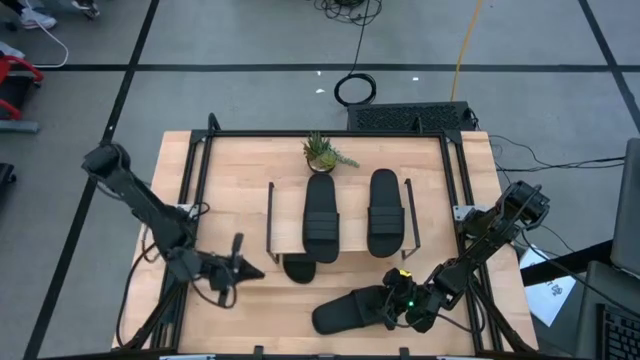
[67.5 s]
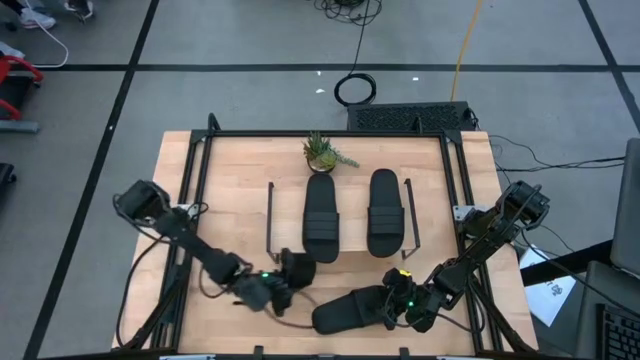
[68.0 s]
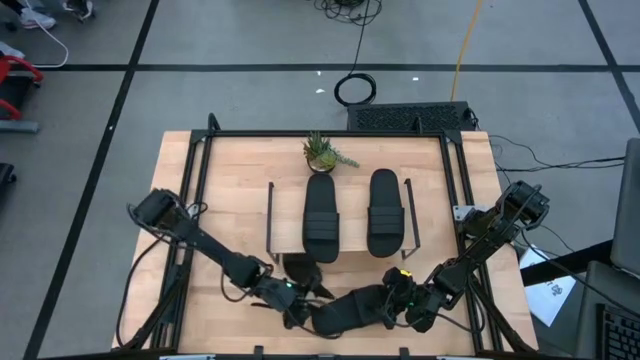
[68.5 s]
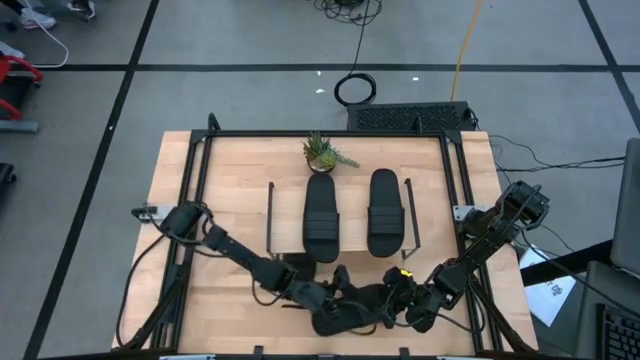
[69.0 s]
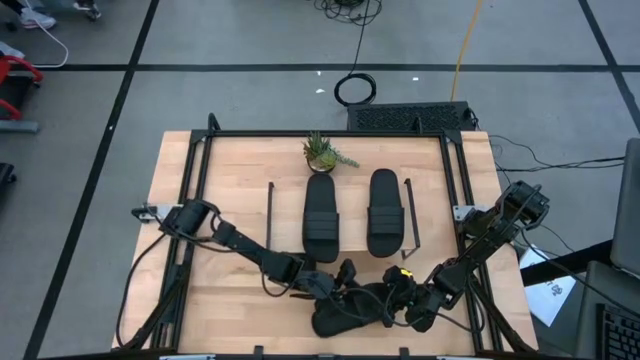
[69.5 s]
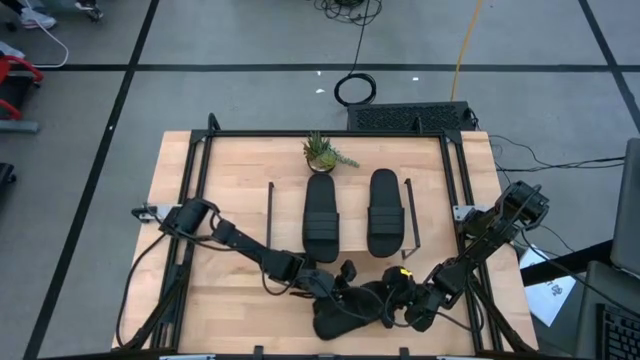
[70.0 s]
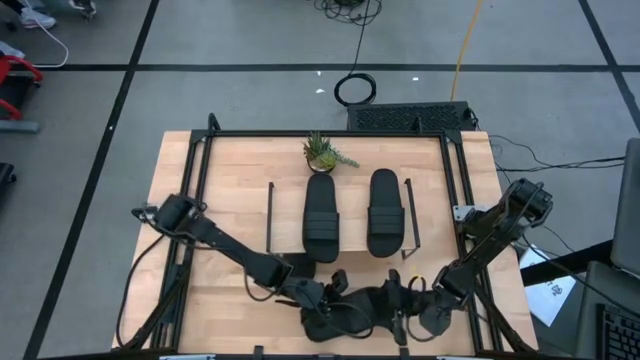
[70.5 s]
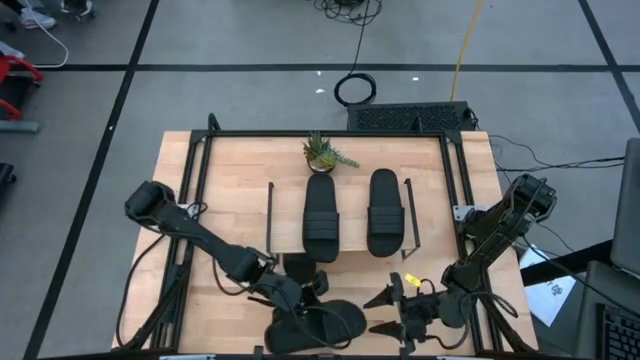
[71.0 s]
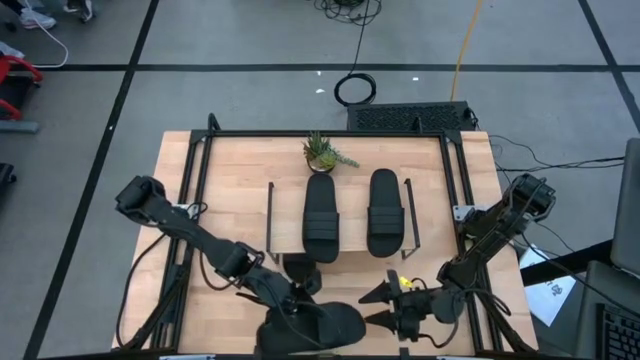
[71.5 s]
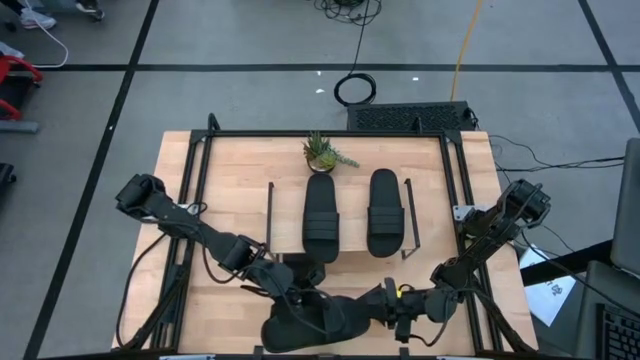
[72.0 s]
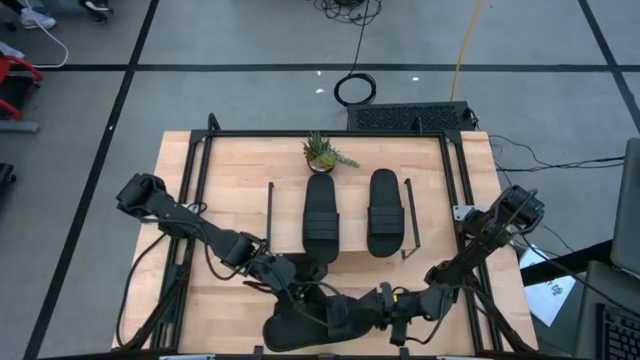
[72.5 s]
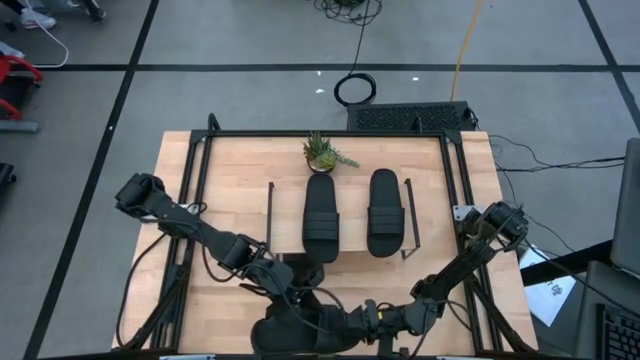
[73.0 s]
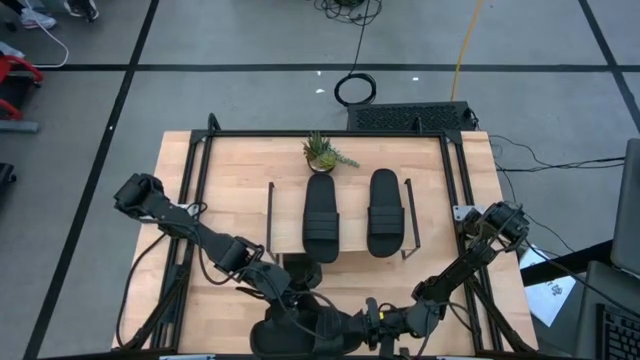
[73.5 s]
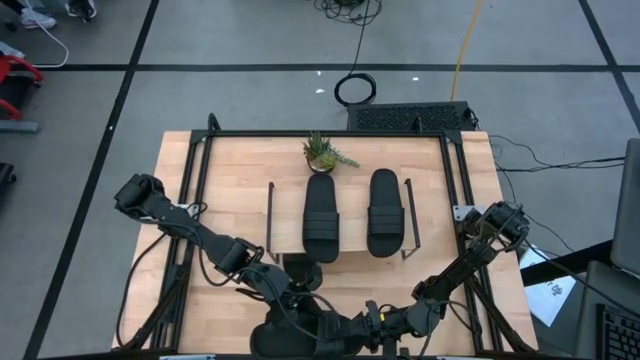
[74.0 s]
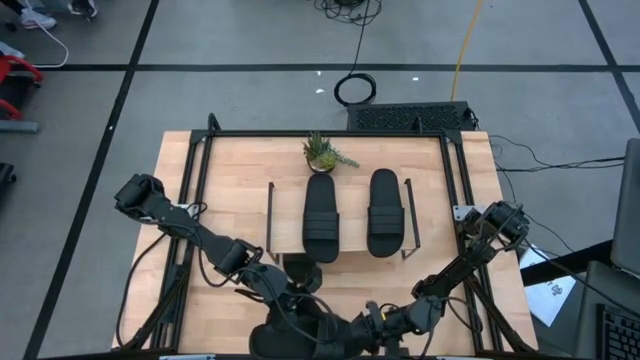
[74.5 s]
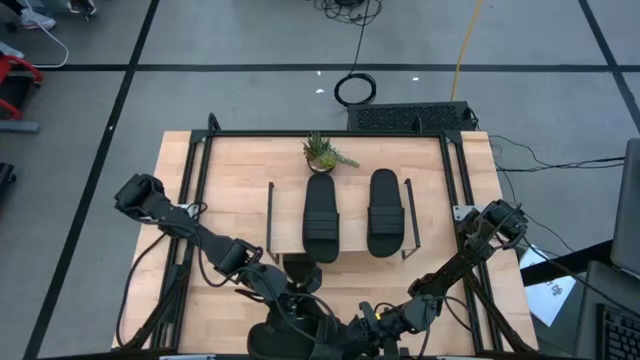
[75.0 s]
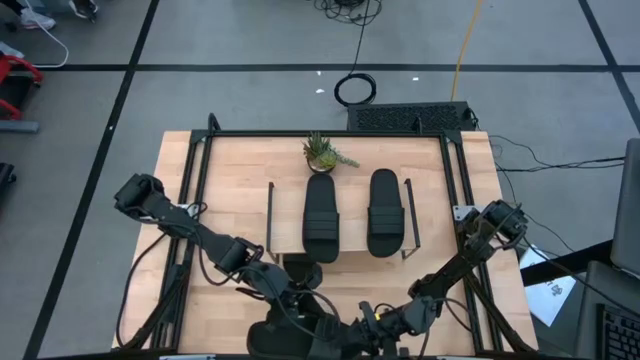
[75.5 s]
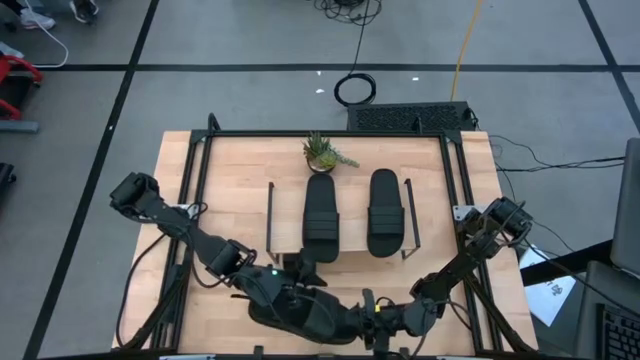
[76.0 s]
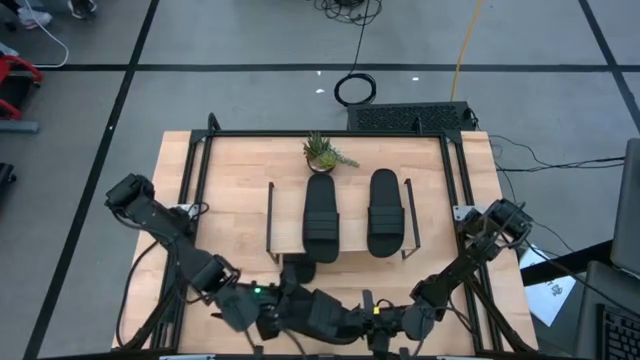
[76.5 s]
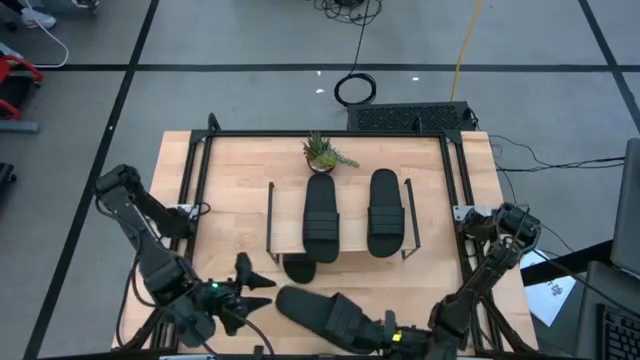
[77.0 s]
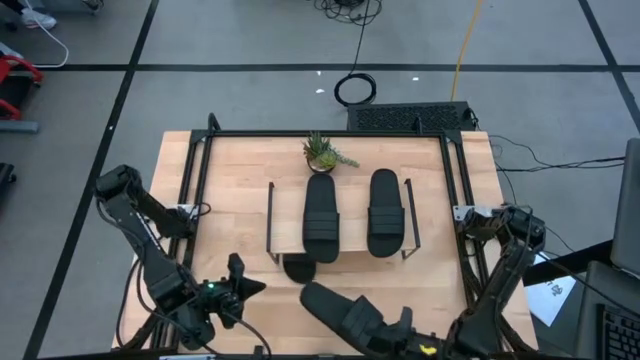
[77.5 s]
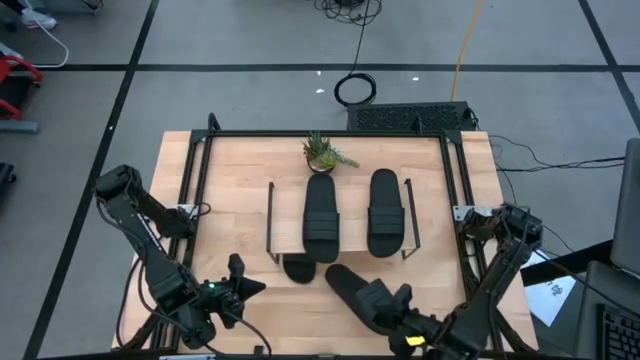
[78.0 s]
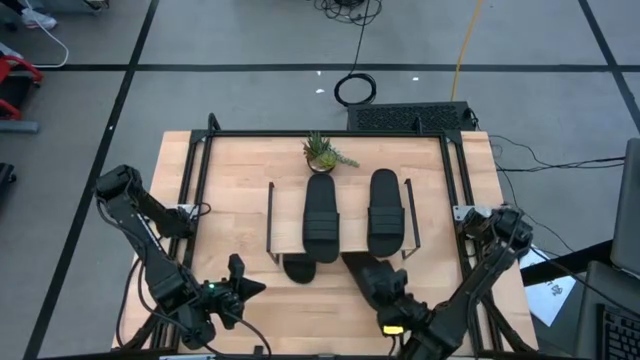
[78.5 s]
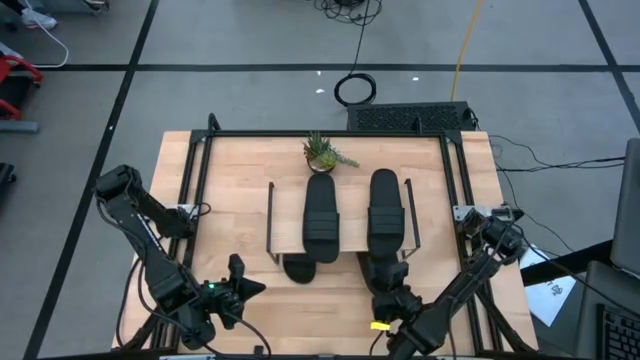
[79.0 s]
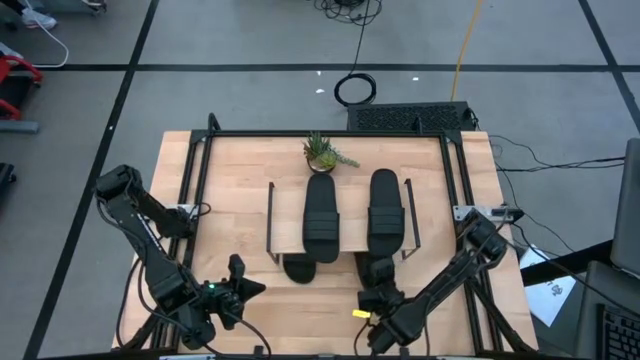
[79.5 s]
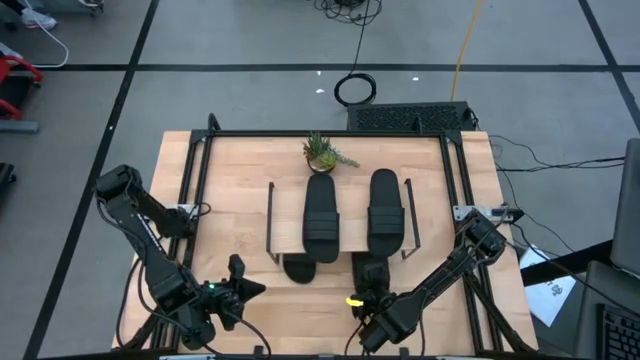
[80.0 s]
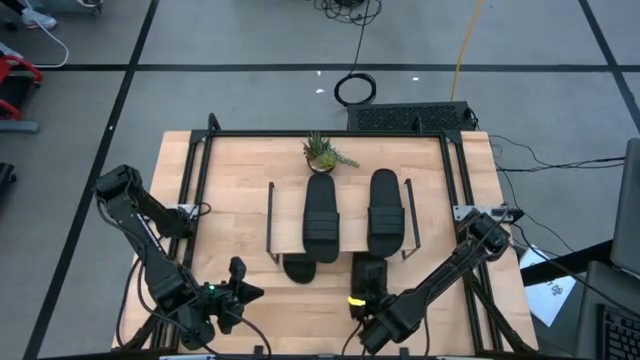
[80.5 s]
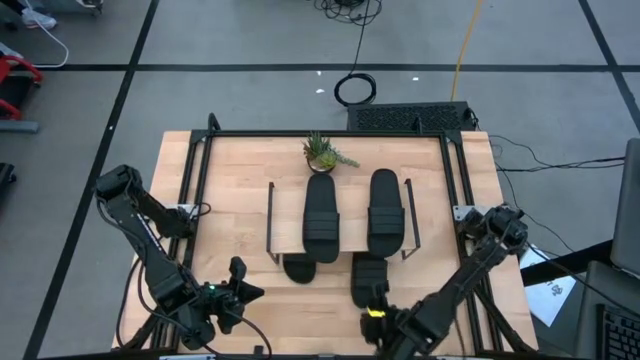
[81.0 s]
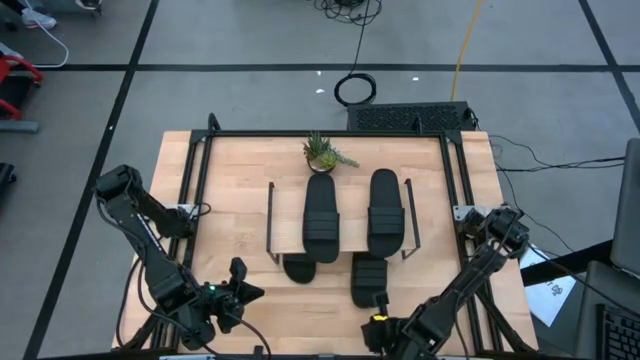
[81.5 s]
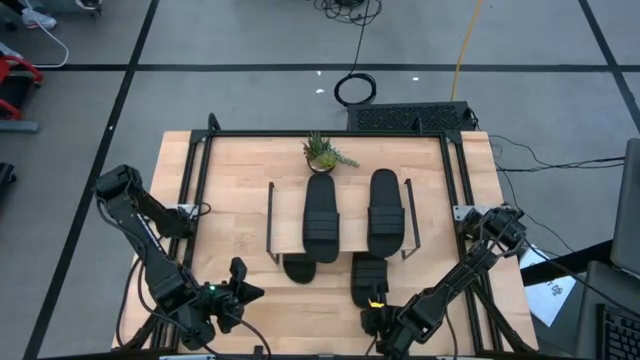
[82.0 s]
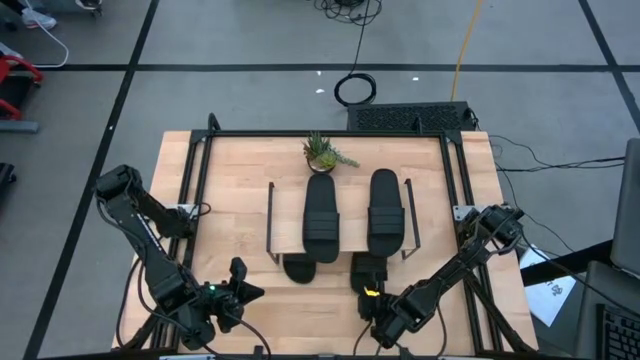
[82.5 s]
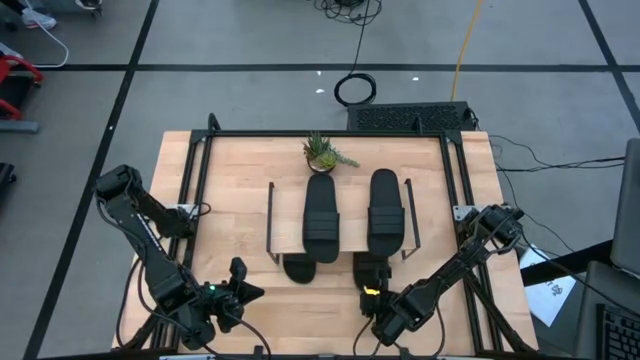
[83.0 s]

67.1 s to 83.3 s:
Task: Pick and place slides into the shelf
Put the black sandal under the shelf

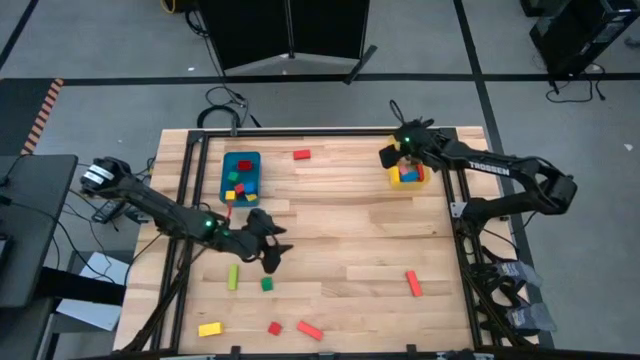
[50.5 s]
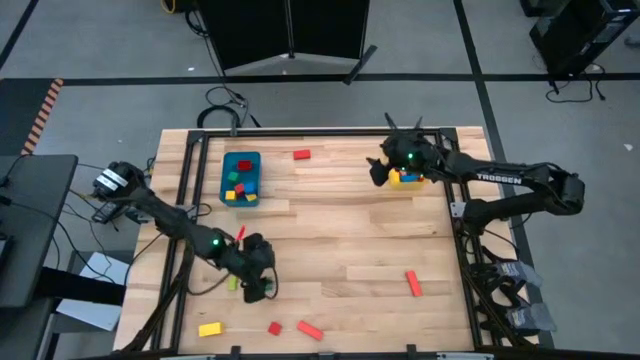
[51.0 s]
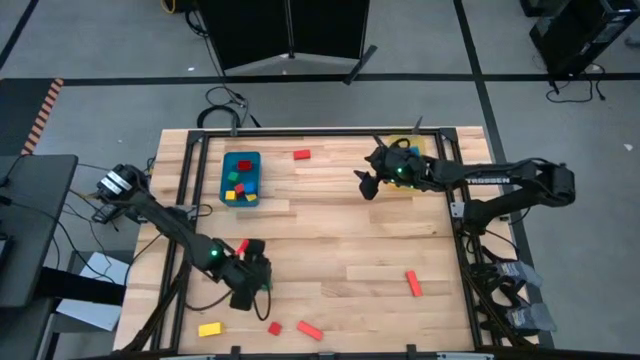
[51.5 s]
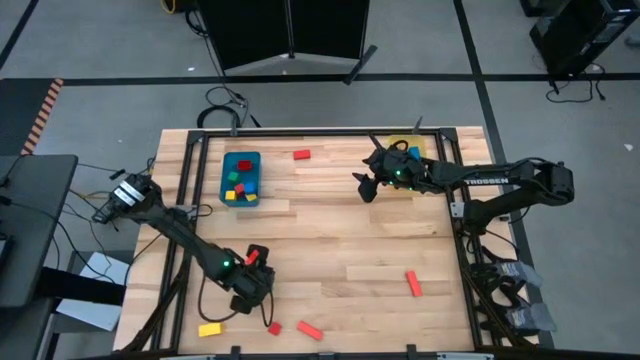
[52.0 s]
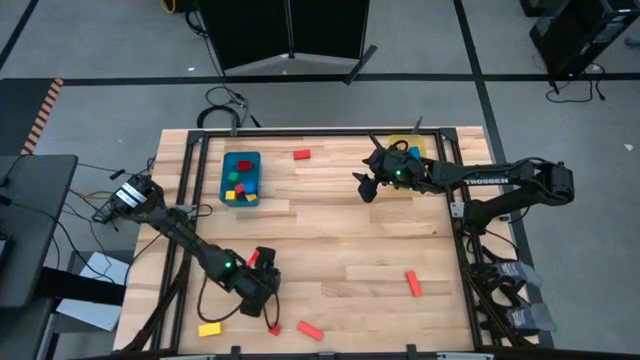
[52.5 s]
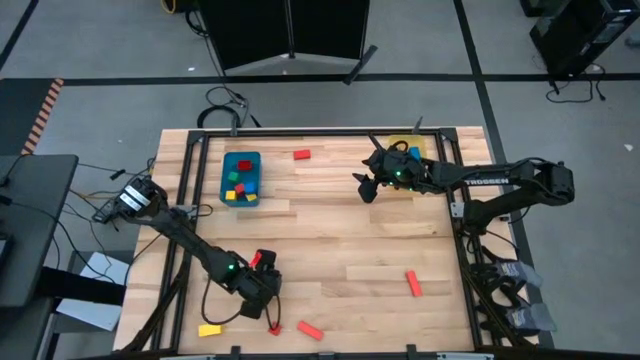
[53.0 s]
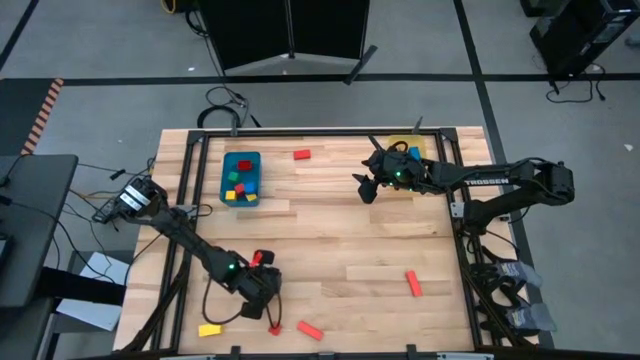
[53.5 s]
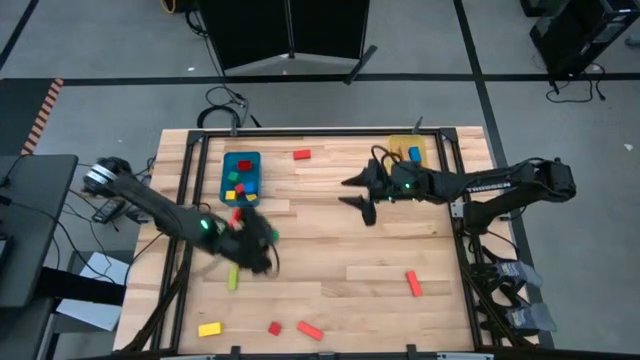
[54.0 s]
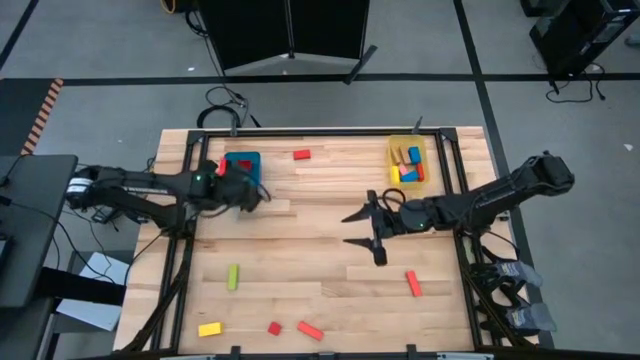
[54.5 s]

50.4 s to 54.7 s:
Task: Sort blocks by size
Put the small green block into the blue bin

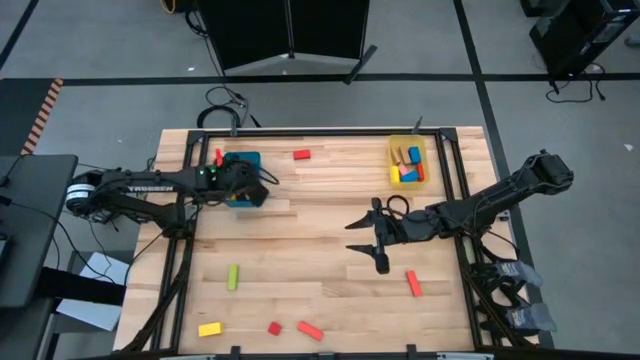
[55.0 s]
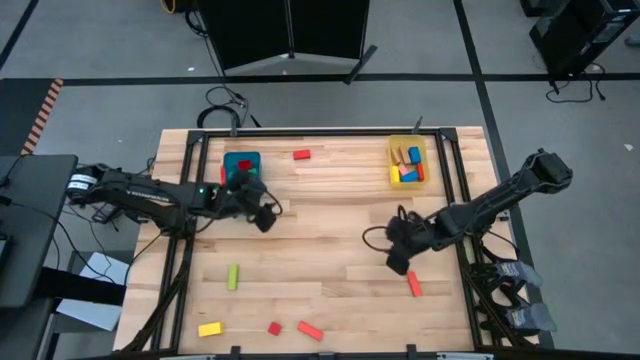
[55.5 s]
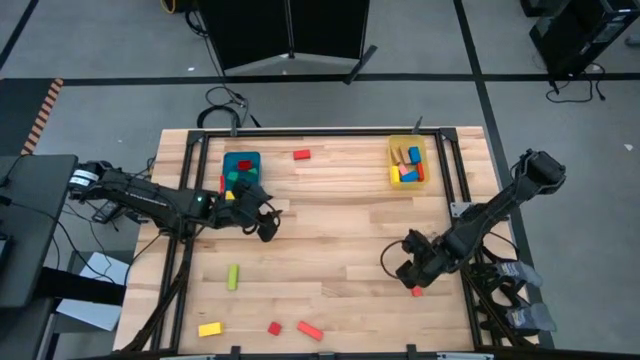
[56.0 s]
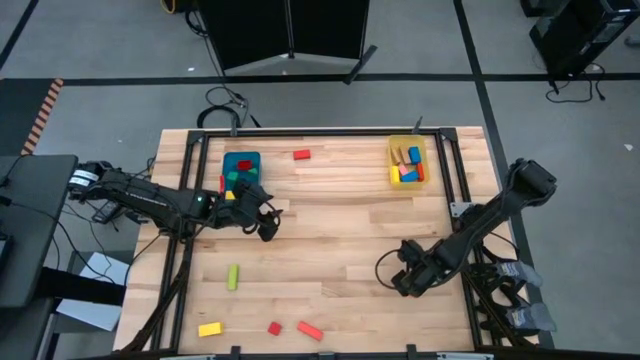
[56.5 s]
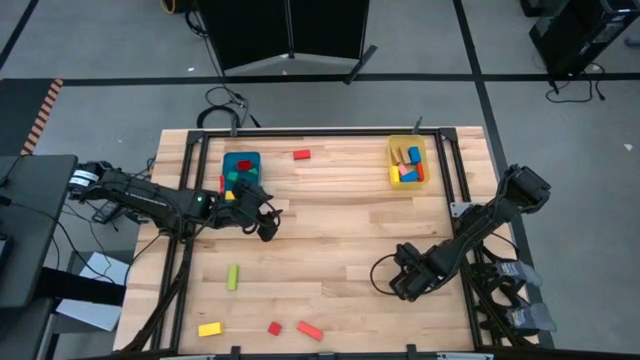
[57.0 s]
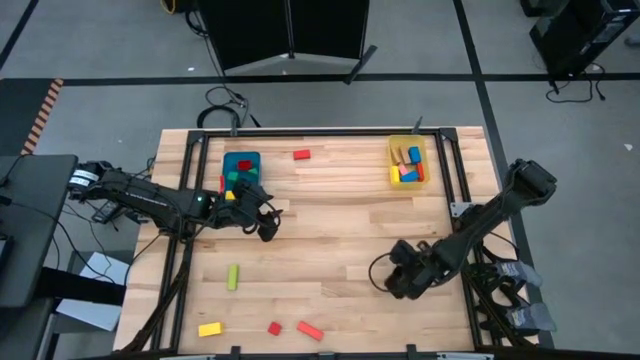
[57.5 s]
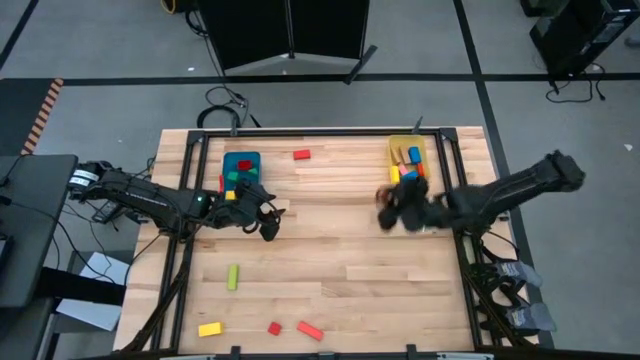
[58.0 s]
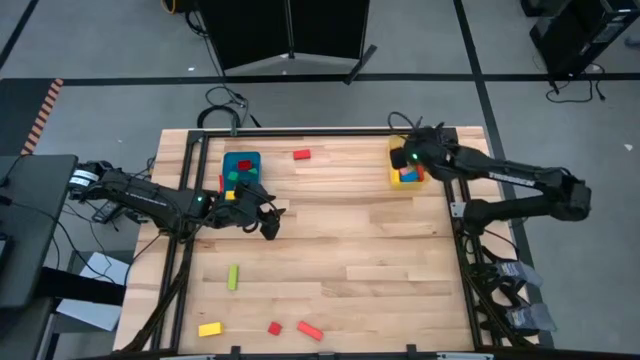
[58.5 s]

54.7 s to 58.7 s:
Put the large orange block into the yellow bin
